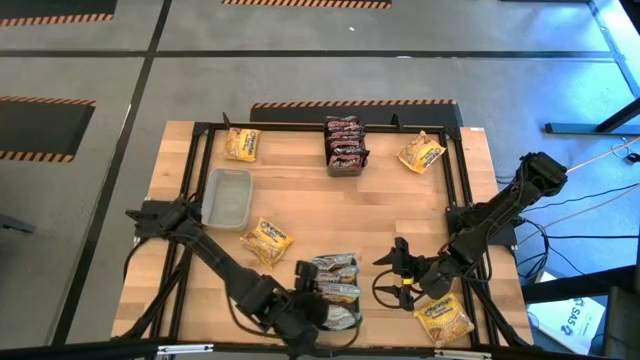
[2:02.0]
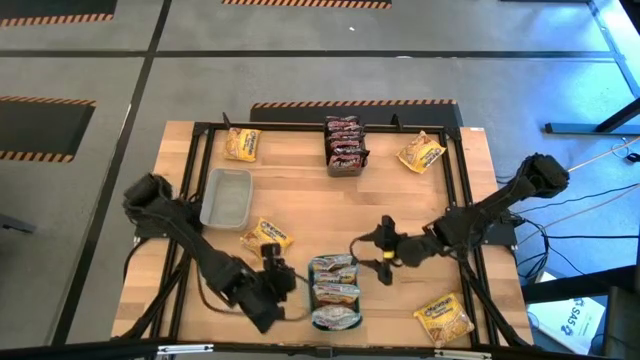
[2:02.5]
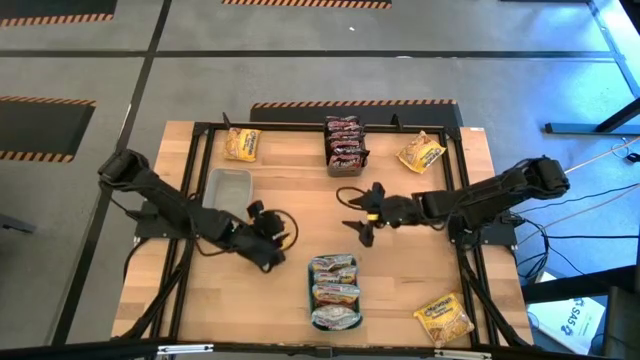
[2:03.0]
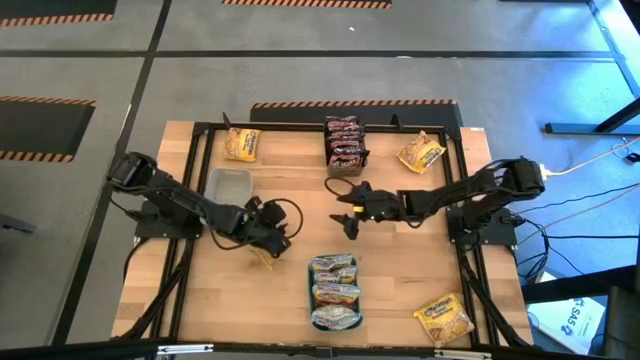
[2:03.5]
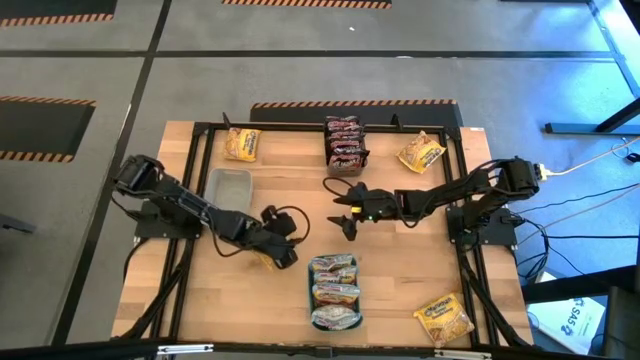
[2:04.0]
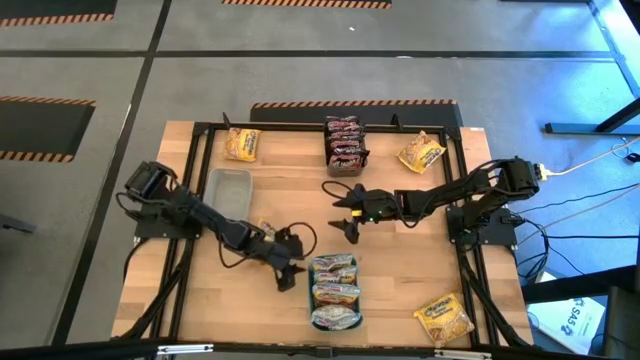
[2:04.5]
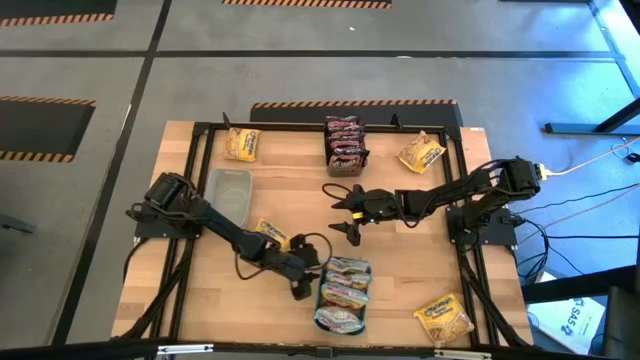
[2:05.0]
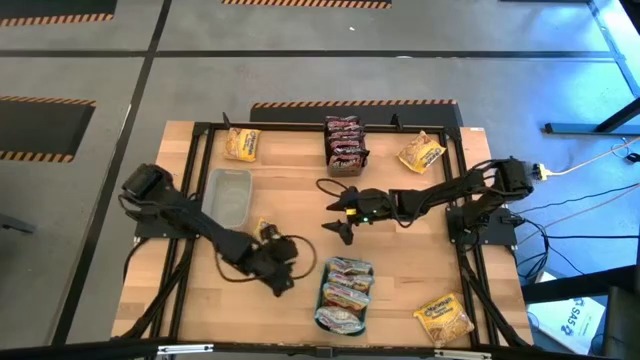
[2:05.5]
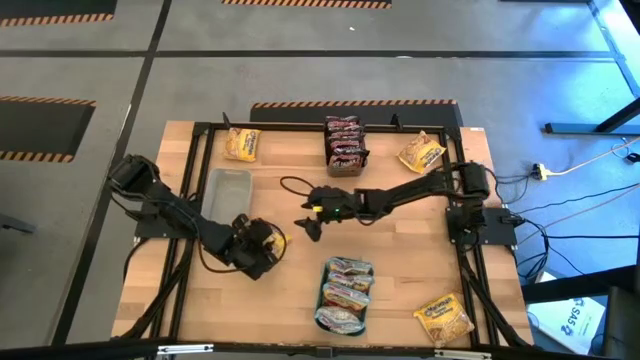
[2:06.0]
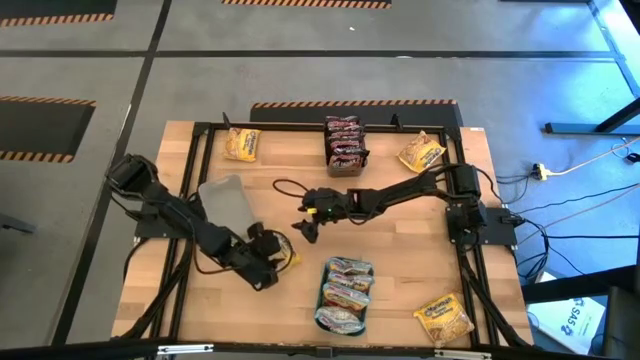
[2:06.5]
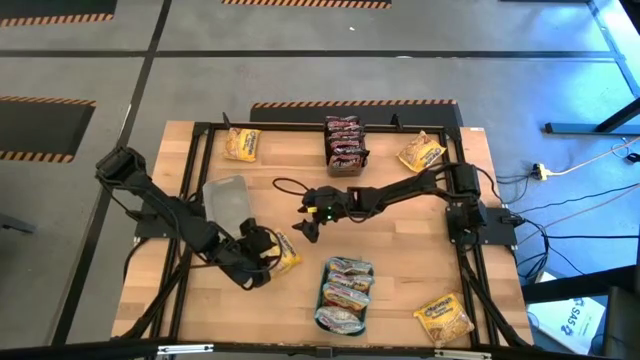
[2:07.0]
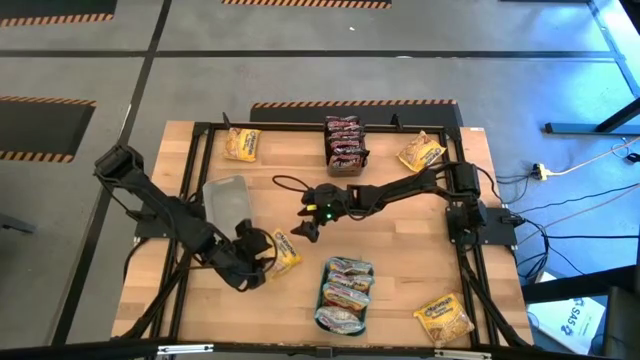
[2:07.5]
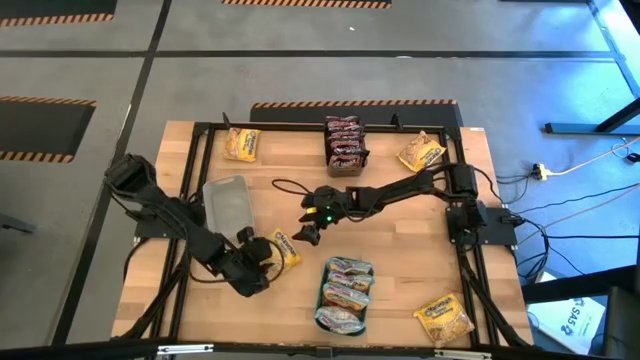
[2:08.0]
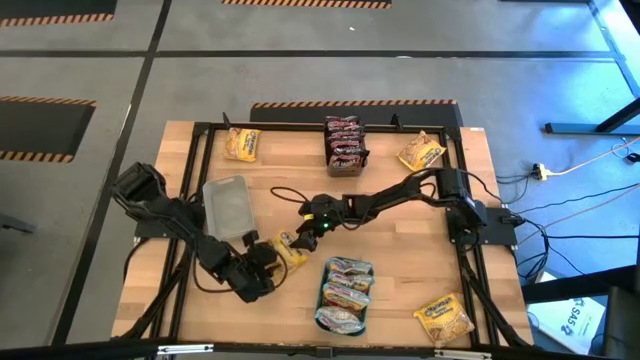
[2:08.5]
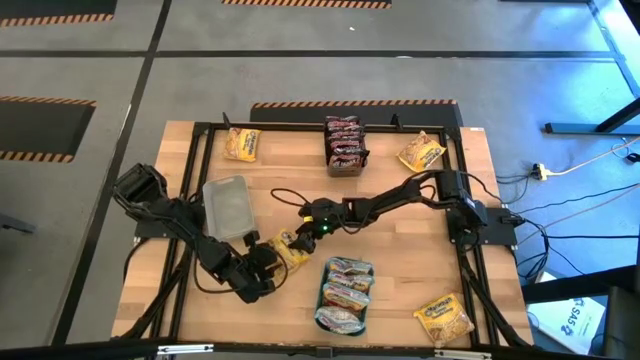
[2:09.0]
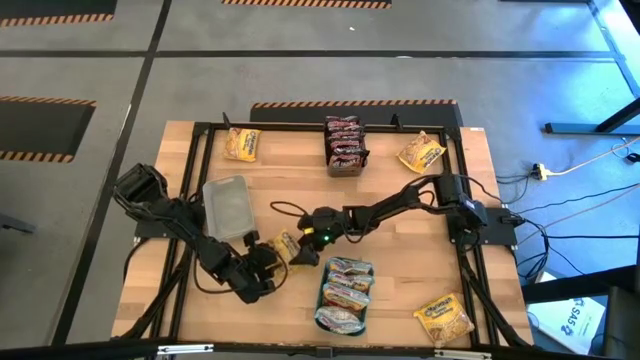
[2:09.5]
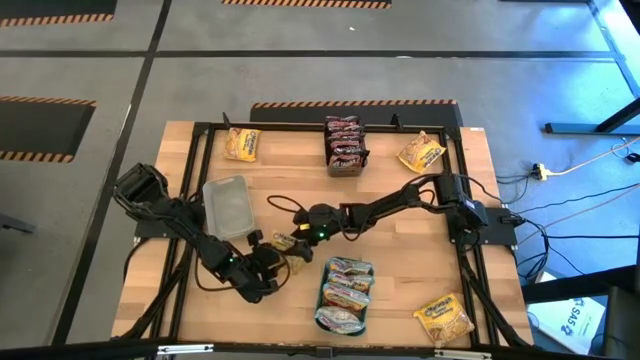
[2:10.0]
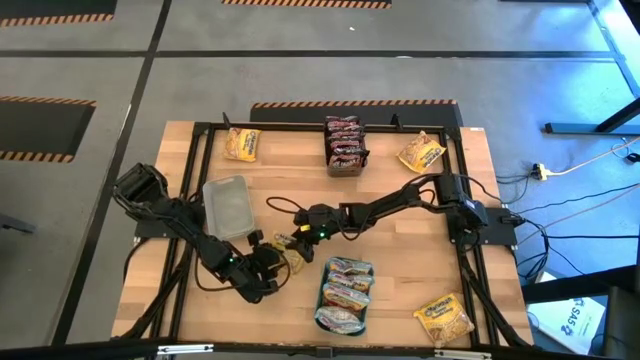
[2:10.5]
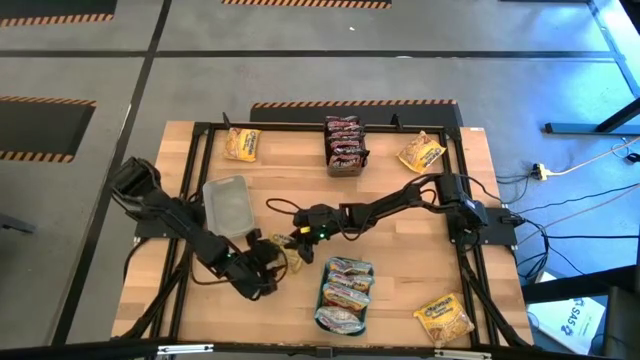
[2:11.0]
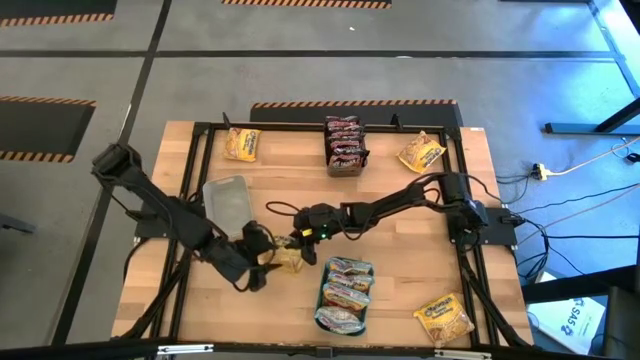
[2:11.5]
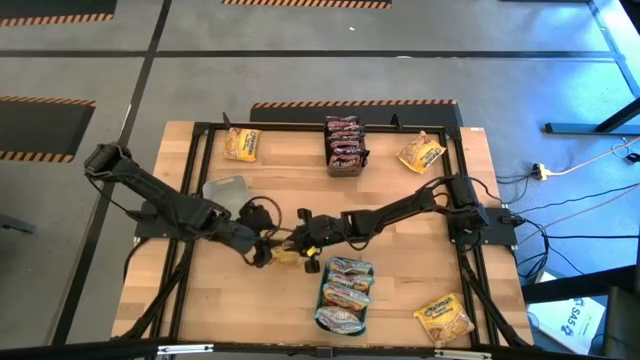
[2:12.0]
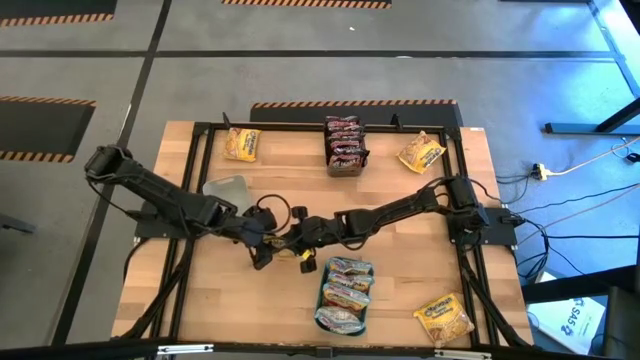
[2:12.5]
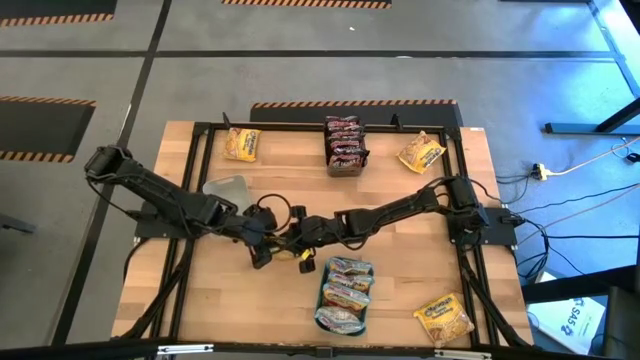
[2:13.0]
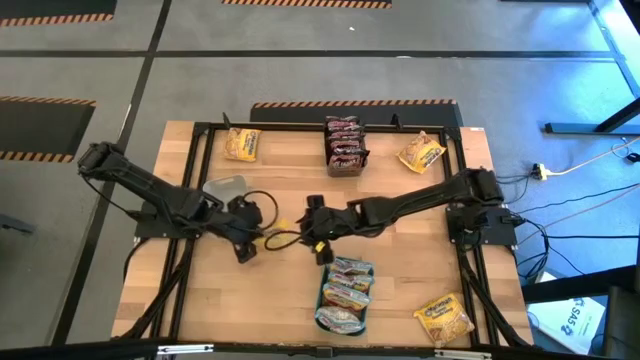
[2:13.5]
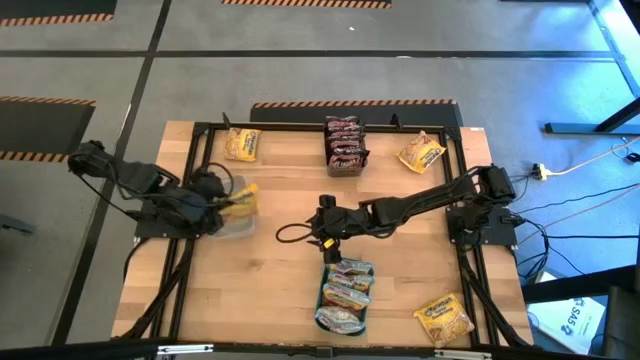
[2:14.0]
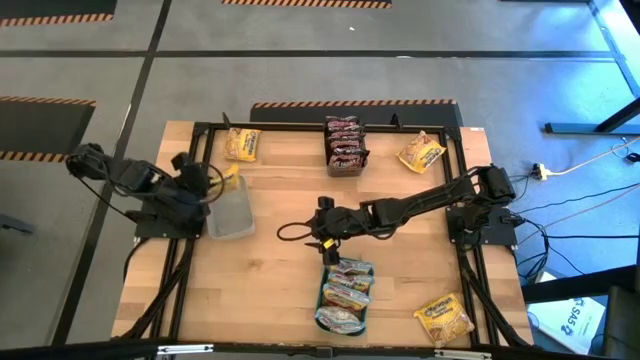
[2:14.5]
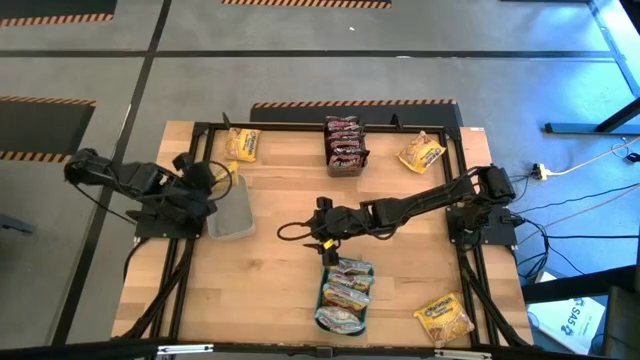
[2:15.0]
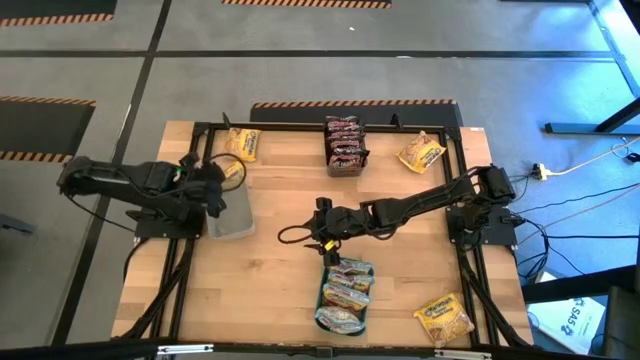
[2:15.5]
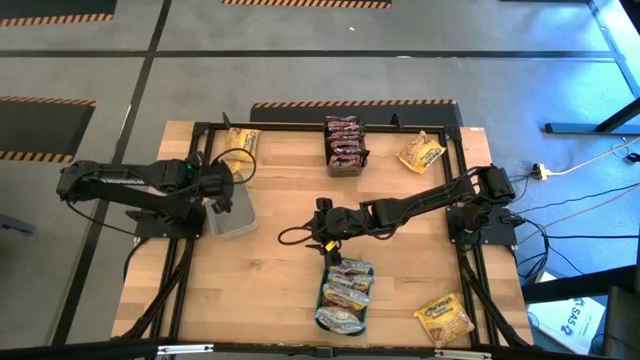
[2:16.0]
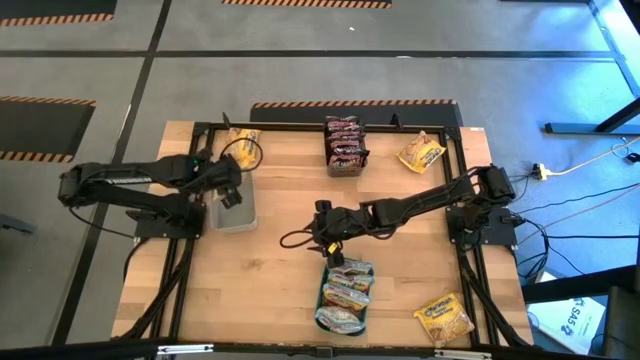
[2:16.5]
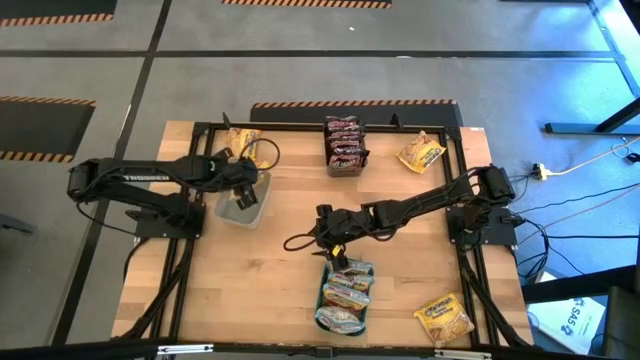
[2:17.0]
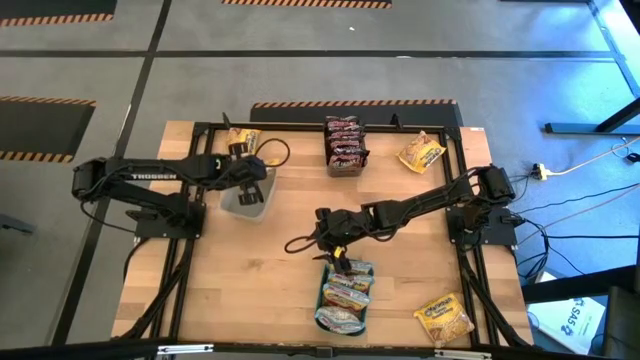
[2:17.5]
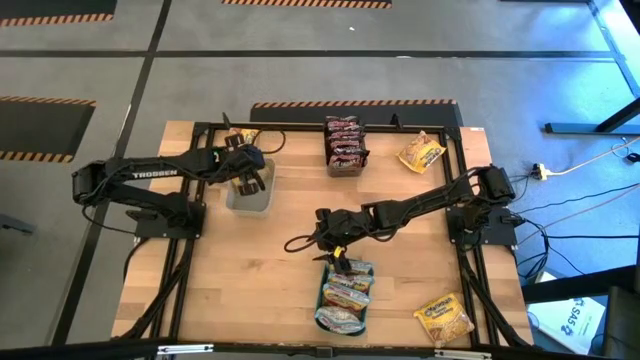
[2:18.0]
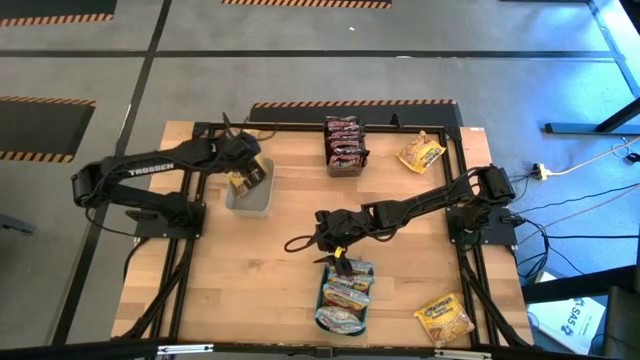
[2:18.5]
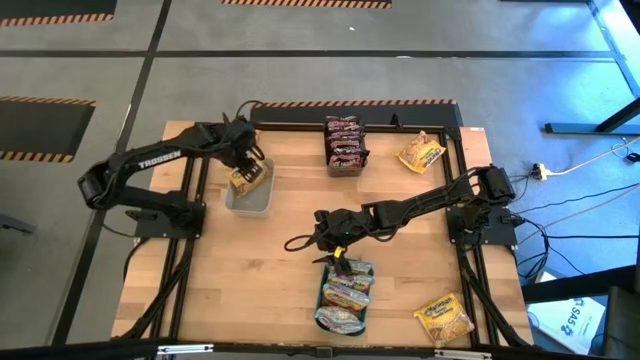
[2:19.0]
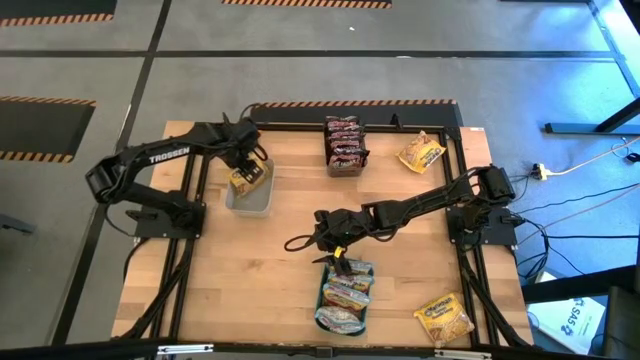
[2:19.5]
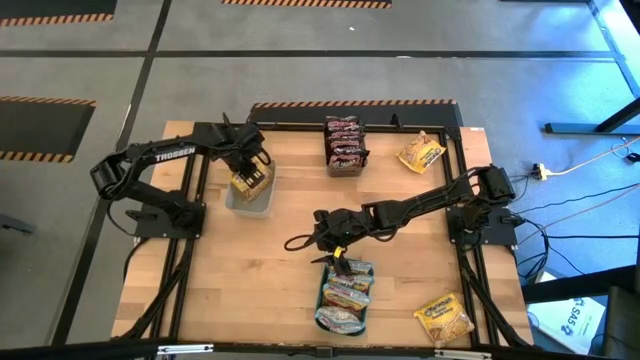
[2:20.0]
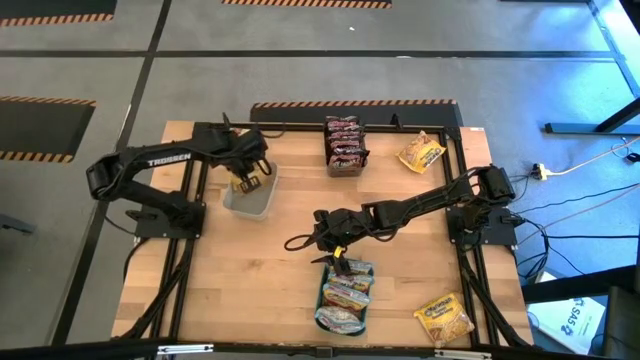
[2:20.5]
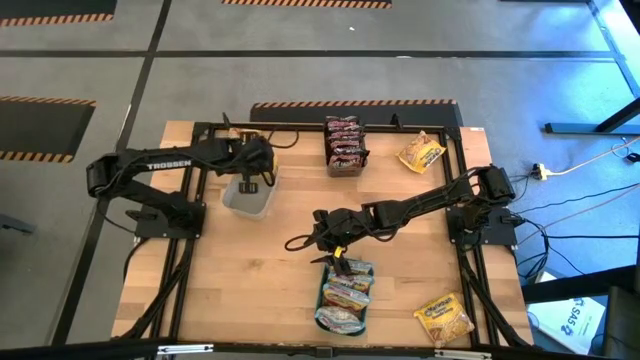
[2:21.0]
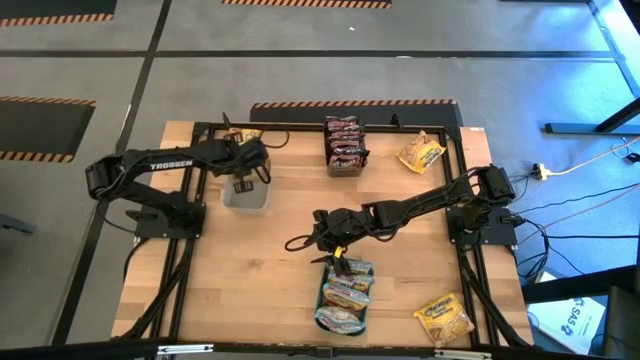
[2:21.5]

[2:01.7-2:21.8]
Task: Sort Maruchan noodles
Put the yellow noodle pack into the white bin
